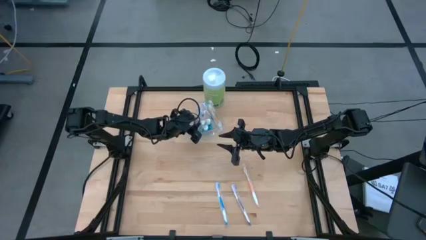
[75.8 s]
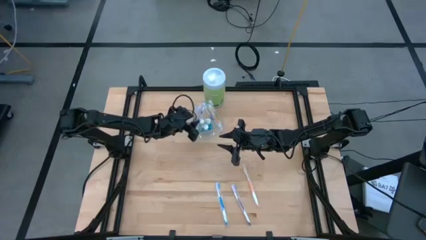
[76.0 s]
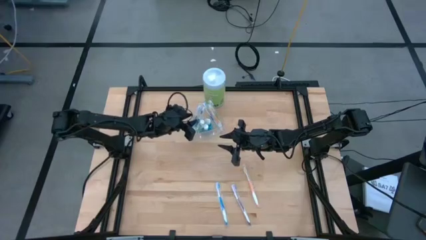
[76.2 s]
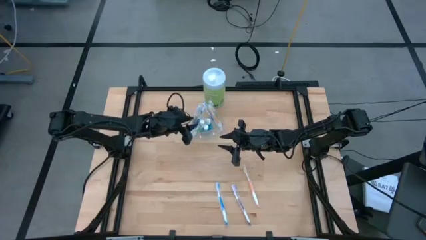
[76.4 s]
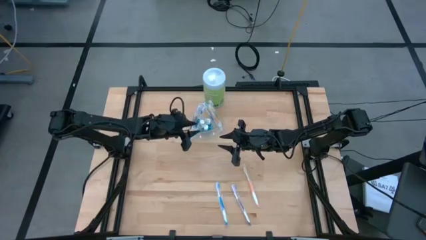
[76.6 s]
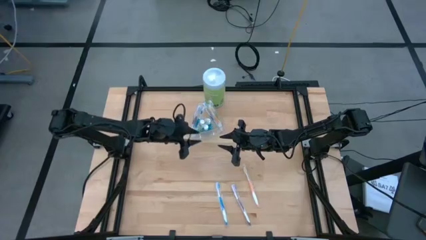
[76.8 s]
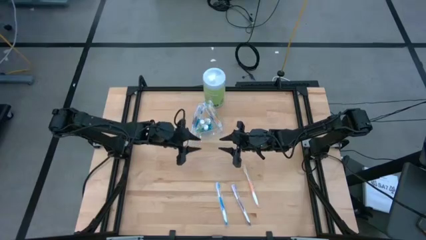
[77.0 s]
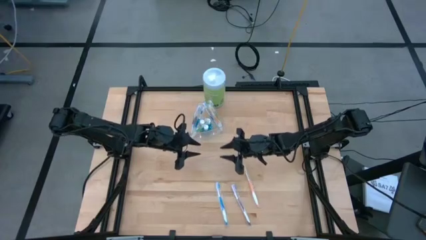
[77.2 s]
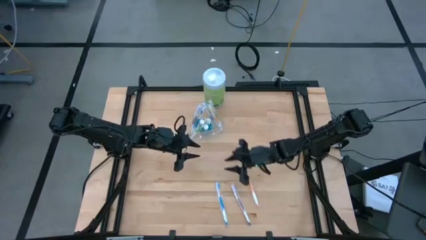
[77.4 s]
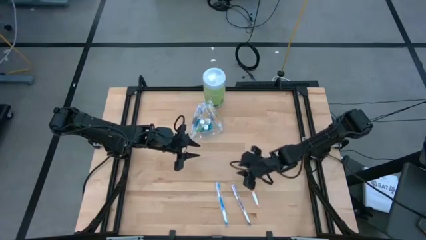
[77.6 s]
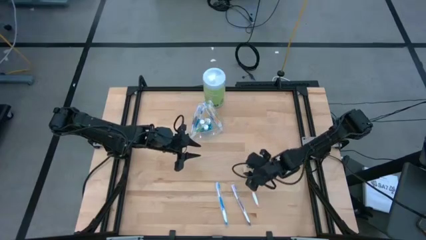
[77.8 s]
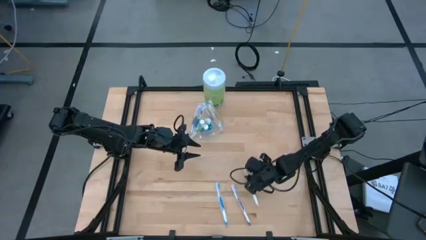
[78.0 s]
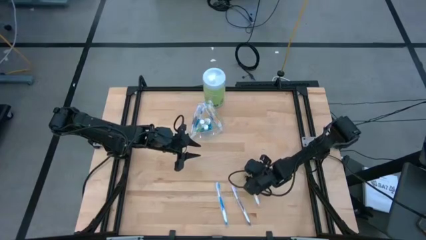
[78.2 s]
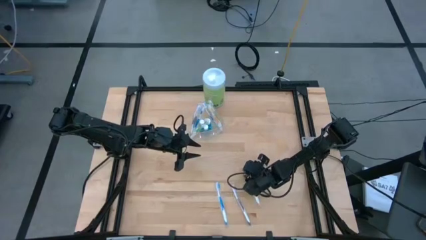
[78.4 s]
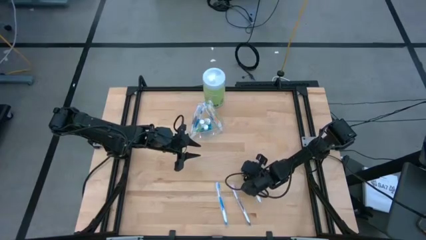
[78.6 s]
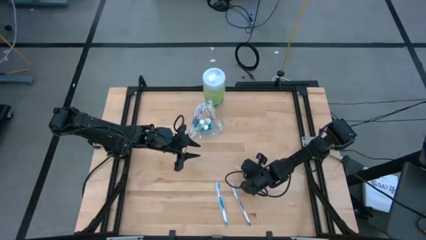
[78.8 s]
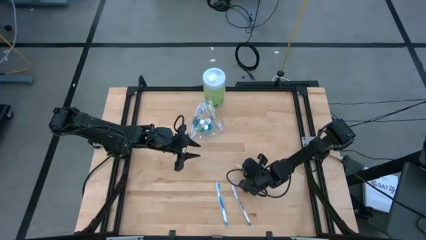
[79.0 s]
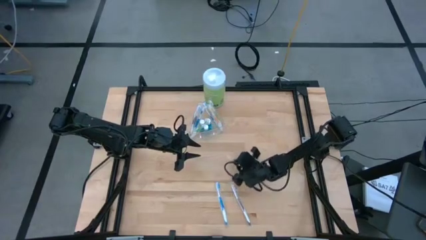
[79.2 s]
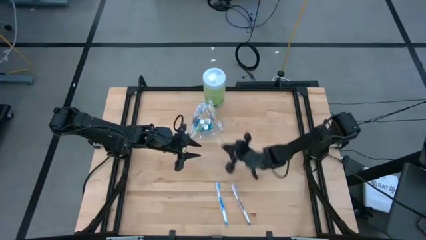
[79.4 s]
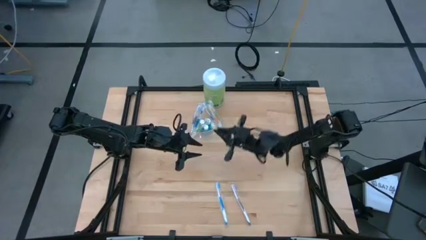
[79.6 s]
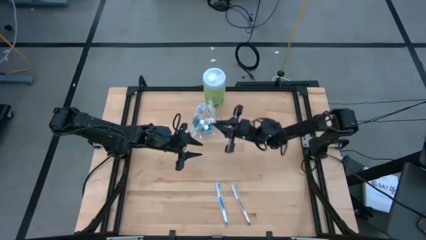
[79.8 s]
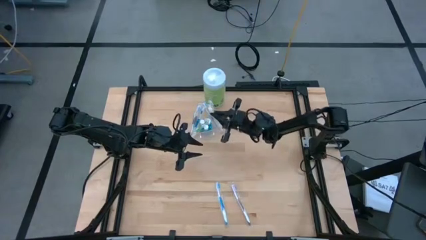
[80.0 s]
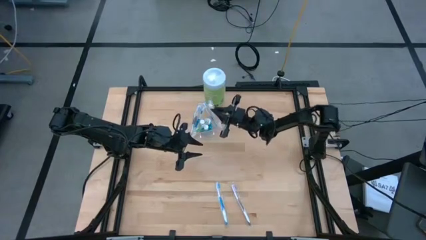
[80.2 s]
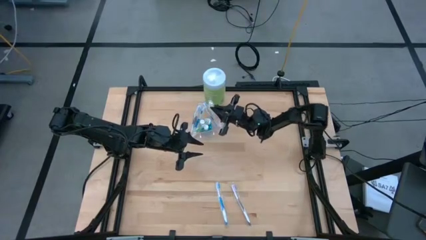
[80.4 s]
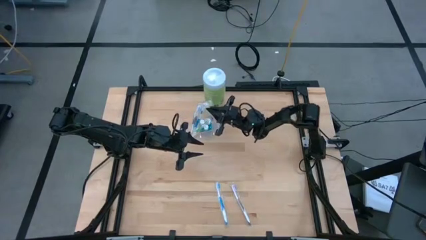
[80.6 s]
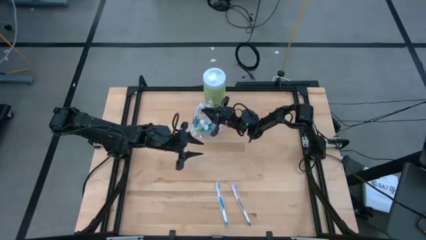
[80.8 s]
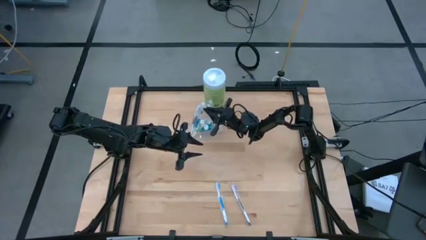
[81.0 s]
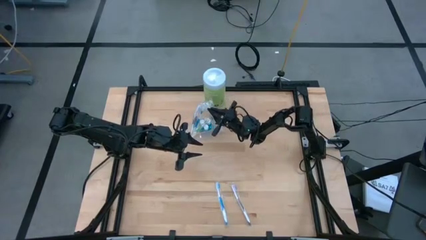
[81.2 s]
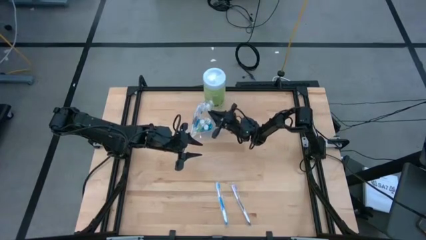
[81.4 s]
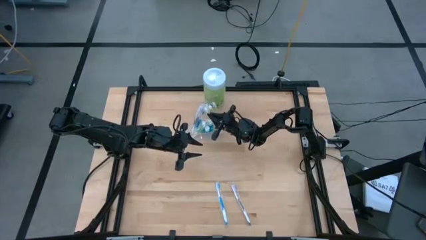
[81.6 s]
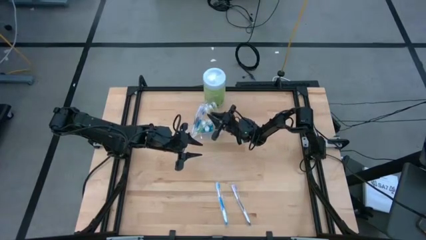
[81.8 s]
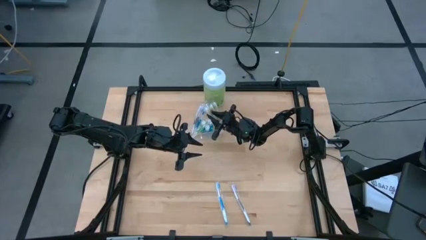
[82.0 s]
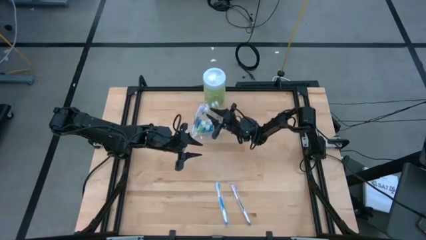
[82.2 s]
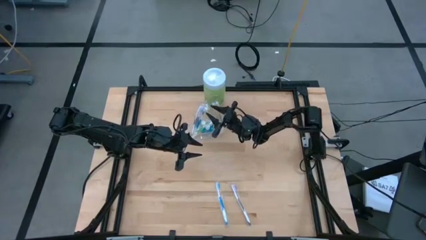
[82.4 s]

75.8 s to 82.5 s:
Task: Pick & Place toothbrushing station
Put the orange toothbrush into the transparent organizer

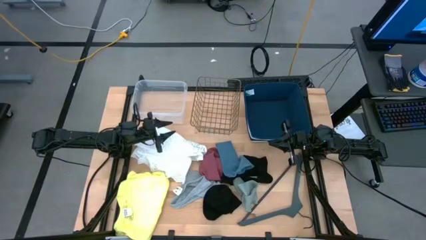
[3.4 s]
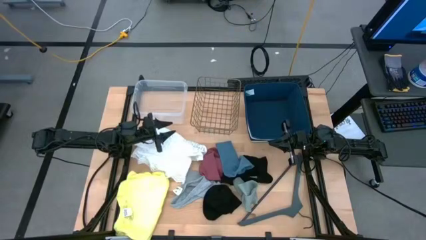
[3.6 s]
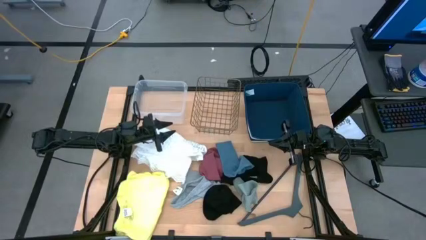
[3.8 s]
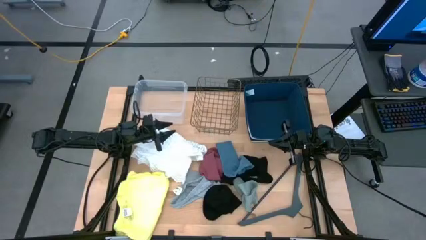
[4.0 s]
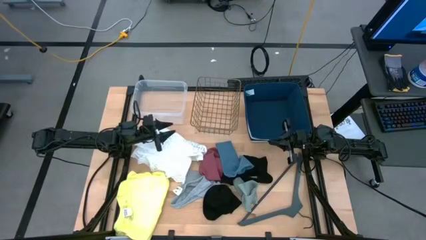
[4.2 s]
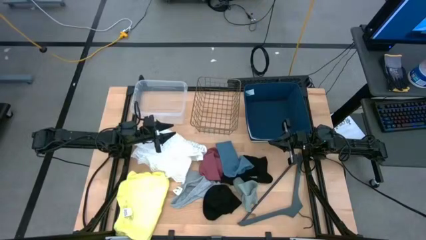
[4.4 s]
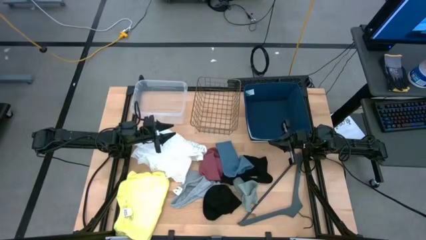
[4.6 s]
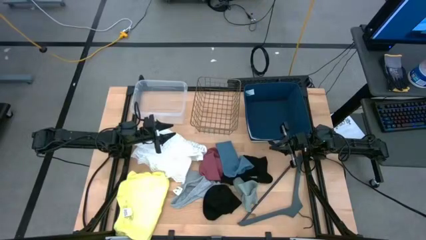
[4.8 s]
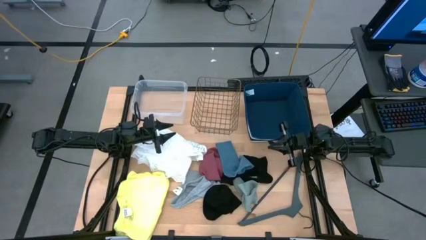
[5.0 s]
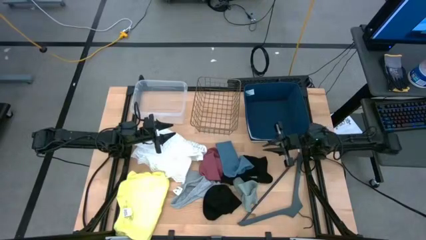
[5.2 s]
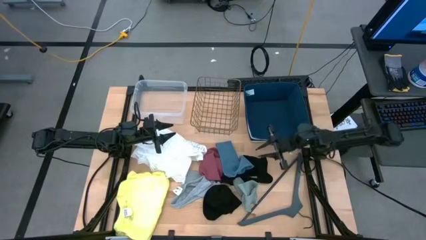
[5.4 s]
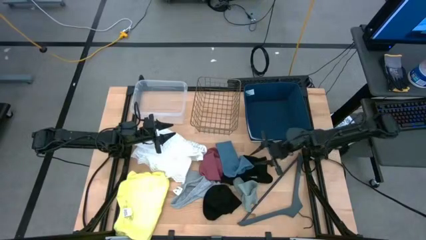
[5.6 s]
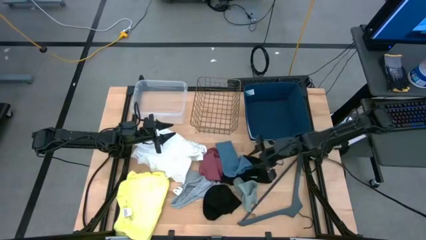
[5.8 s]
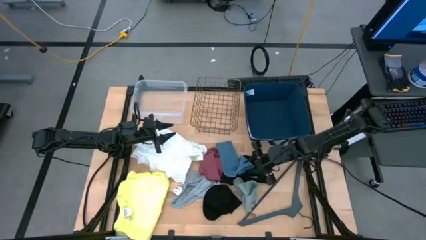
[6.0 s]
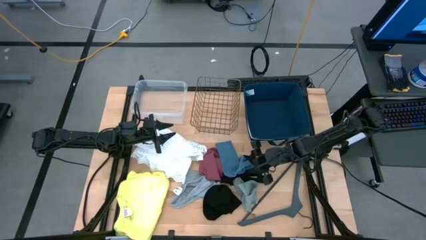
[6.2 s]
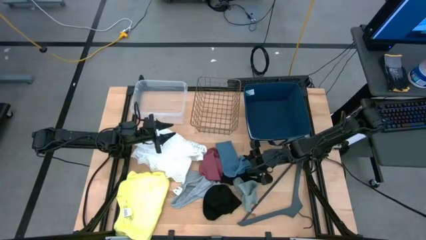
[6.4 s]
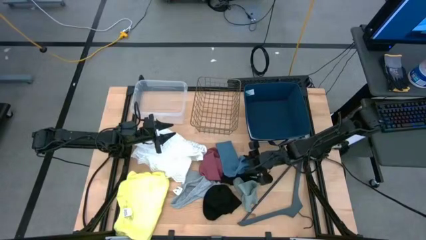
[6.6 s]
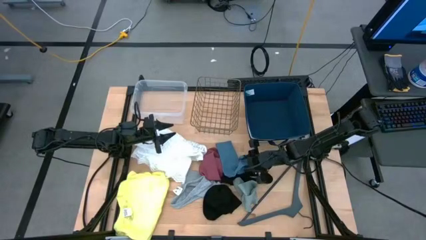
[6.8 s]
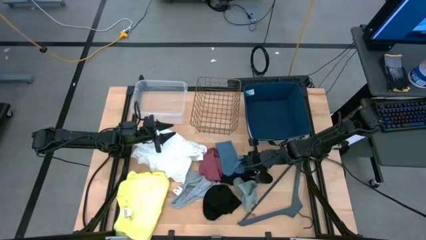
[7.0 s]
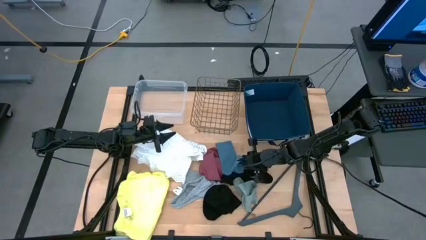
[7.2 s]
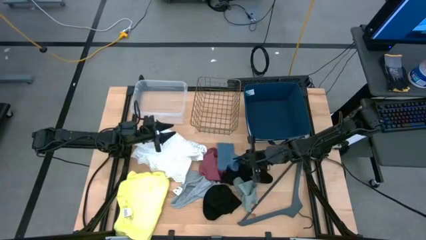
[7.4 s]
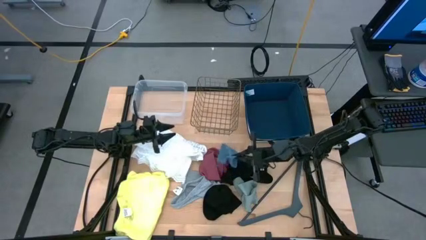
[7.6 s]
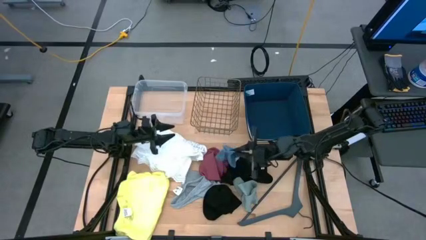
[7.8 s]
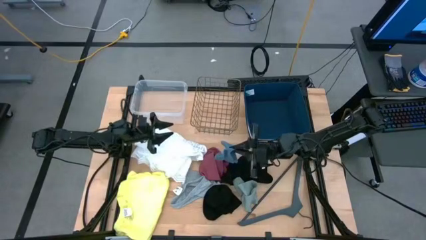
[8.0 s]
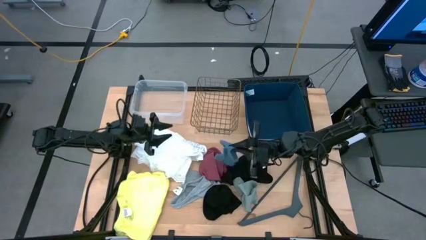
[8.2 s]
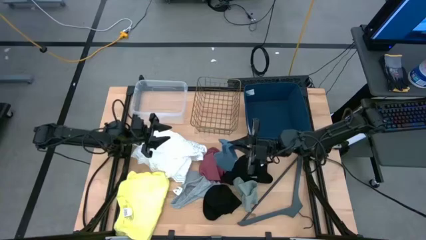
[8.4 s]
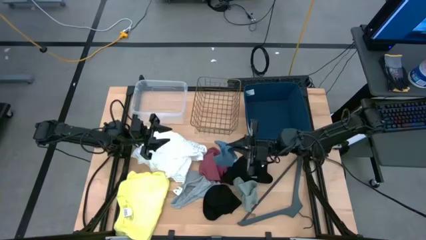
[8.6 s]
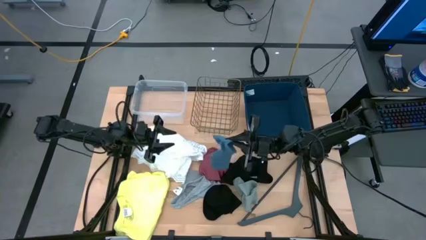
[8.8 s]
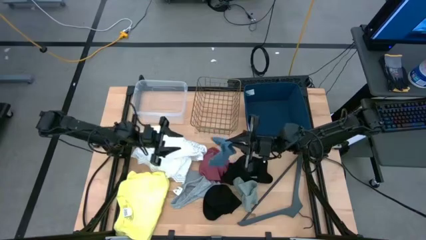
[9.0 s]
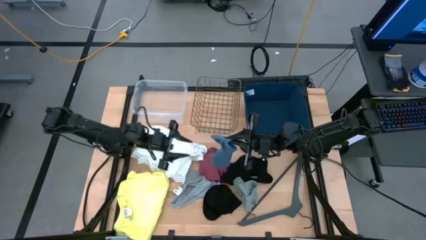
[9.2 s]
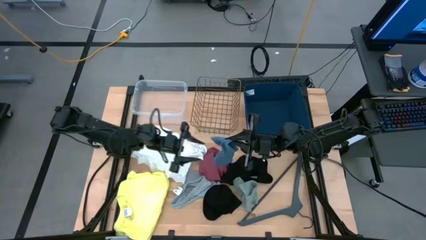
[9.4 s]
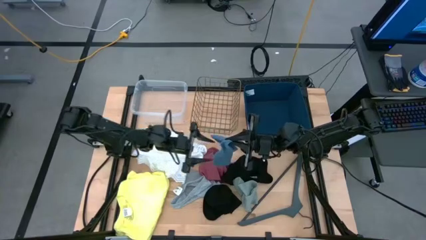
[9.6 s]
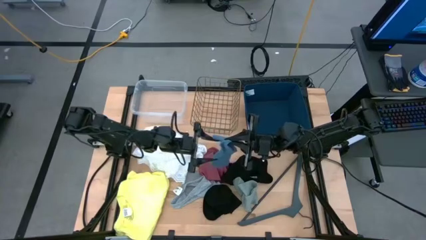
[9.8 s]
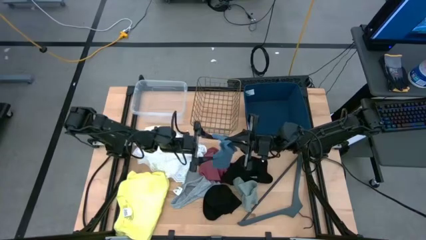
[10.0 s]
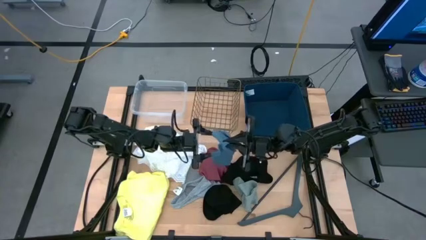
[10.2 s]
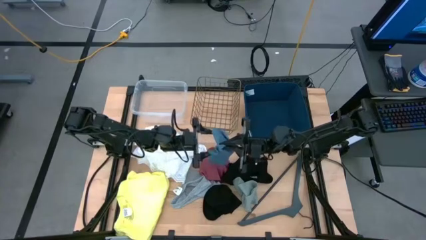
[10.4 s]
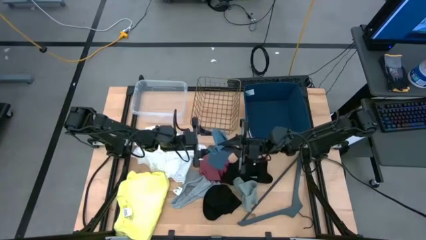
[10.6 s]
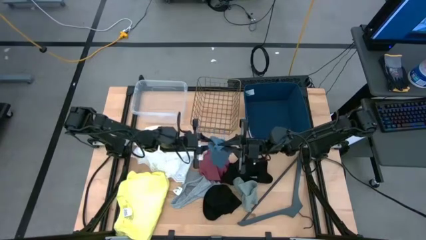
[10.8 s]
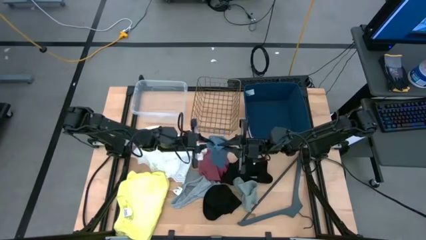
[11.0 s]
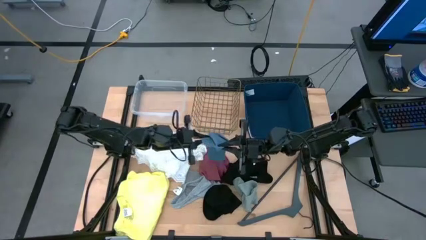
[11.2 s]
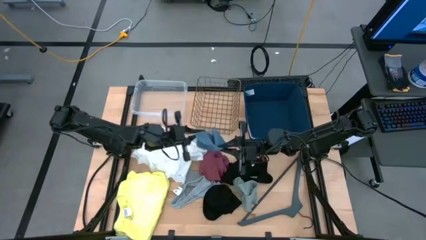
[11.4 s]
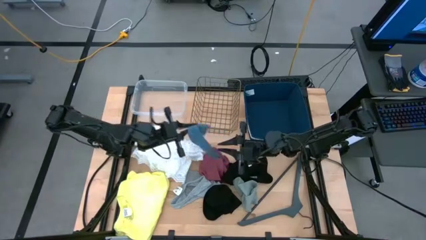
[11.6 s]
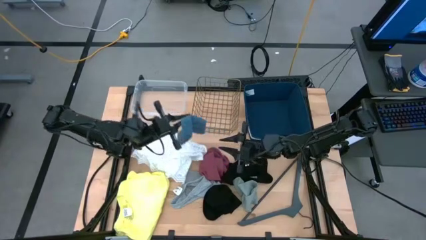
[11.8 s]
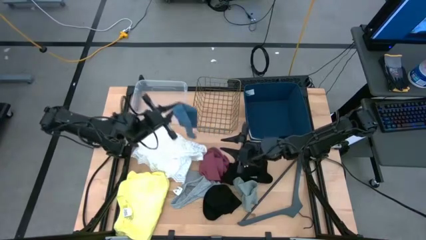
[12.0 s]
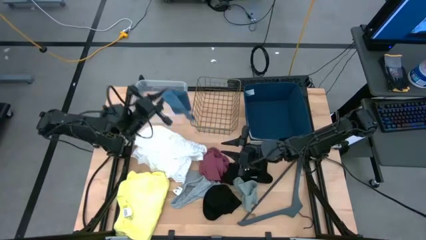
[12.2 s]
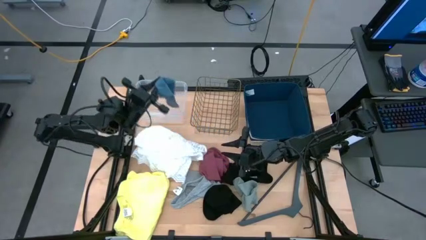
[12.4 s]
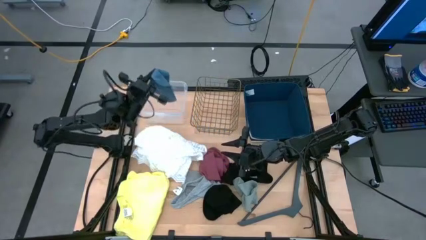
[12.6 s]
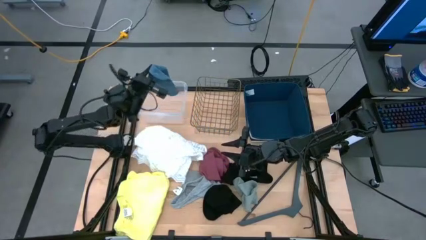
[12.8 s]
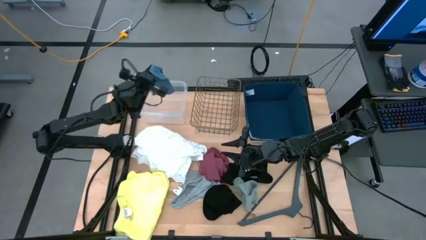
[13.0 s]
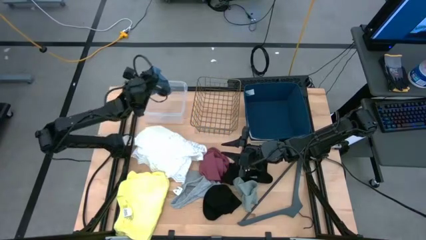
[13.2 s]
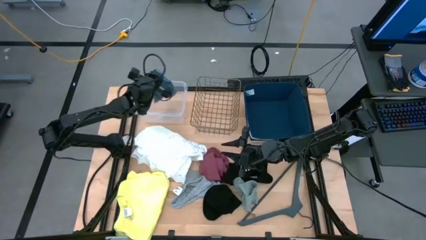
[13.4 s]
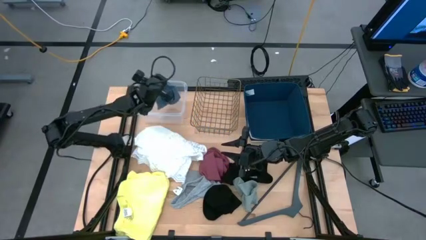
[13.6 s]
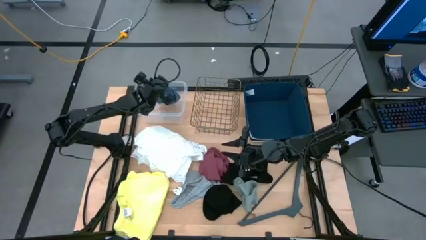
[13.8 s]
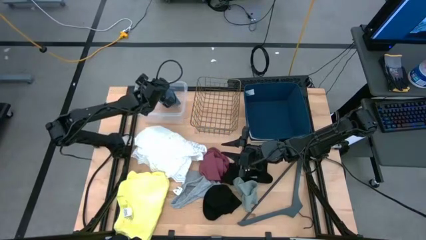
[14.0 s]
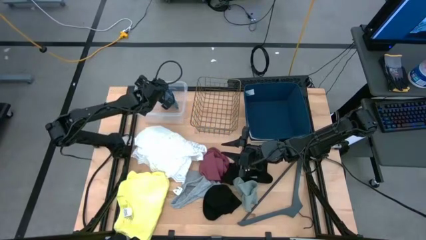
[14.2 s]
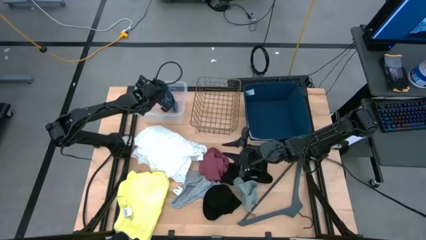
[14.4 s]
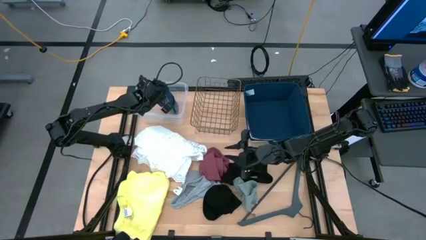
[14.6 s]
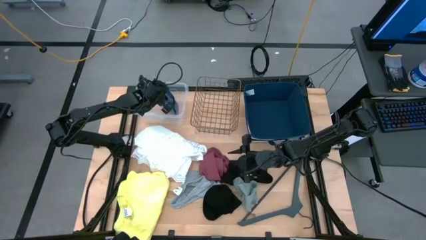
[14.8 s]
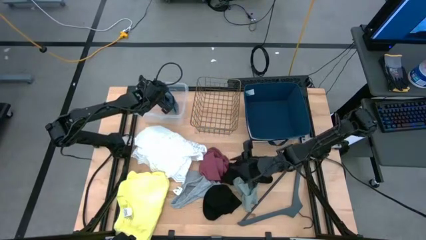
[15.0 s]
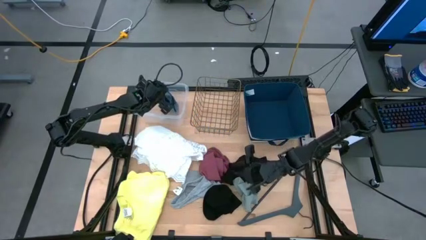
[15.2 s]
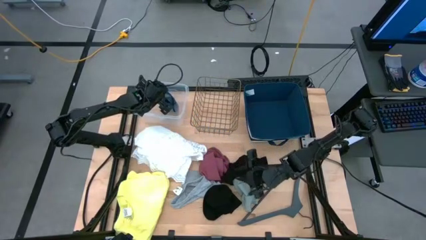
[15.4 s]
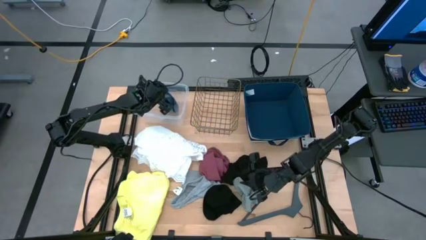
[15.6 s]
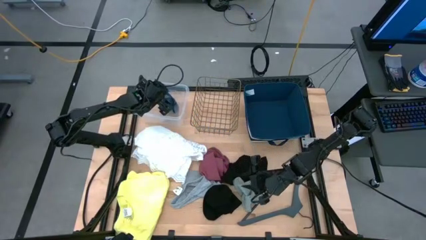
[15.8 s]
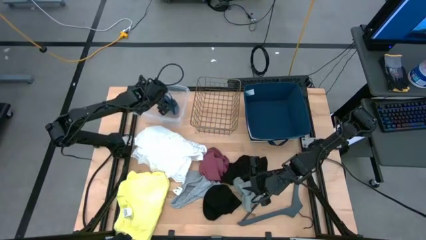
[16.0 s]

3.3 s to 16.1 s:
Task: Pick & Place Cloths
Put the blue sock into the transparent bin
